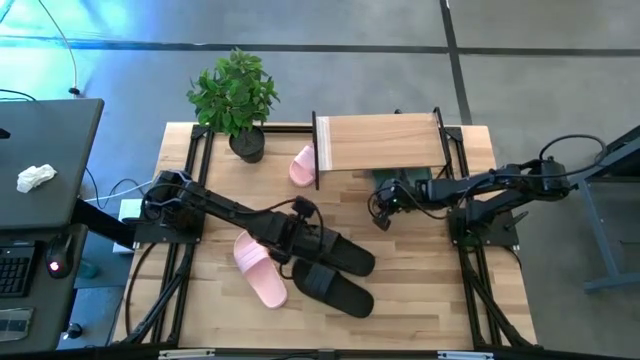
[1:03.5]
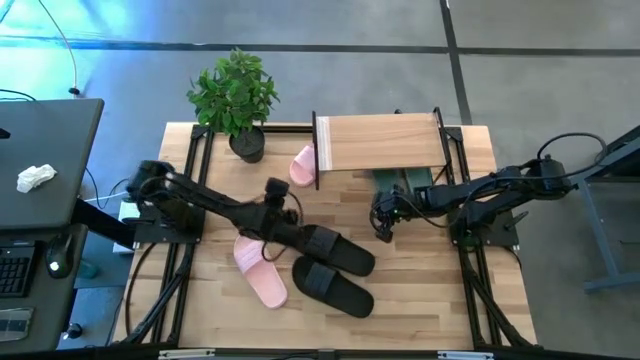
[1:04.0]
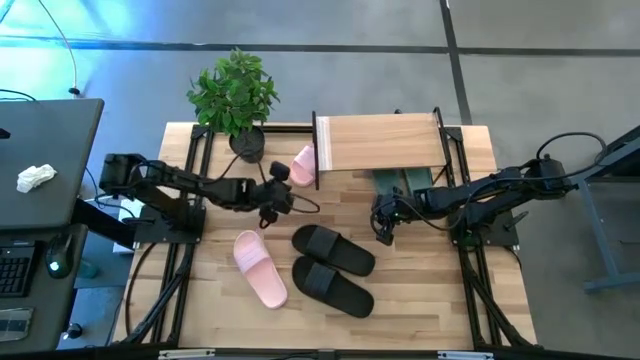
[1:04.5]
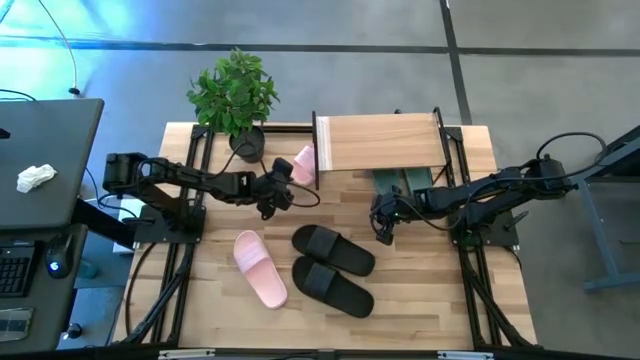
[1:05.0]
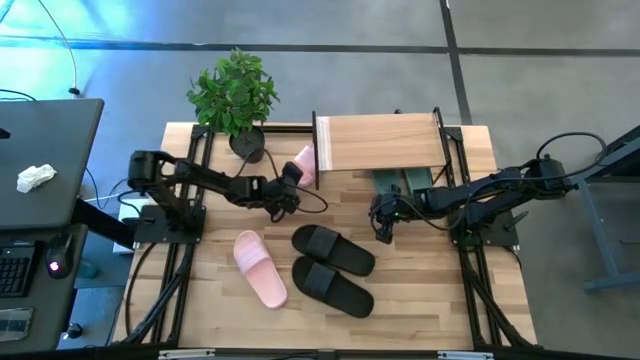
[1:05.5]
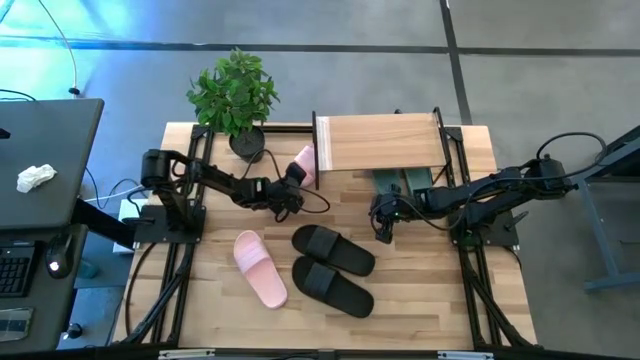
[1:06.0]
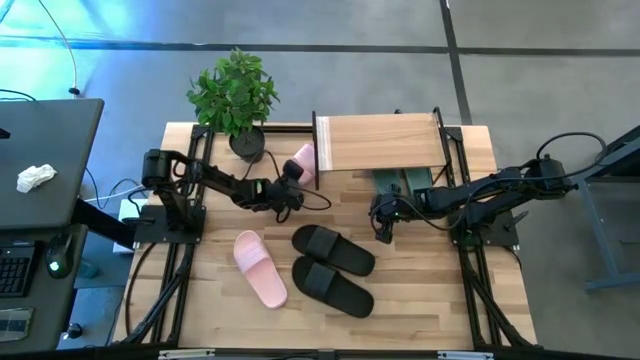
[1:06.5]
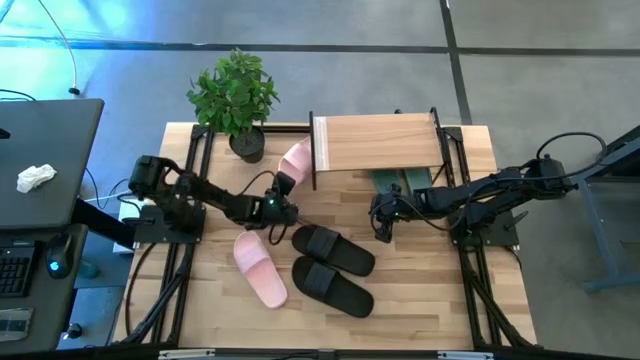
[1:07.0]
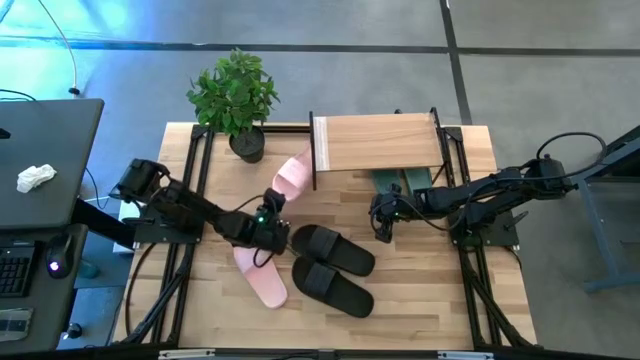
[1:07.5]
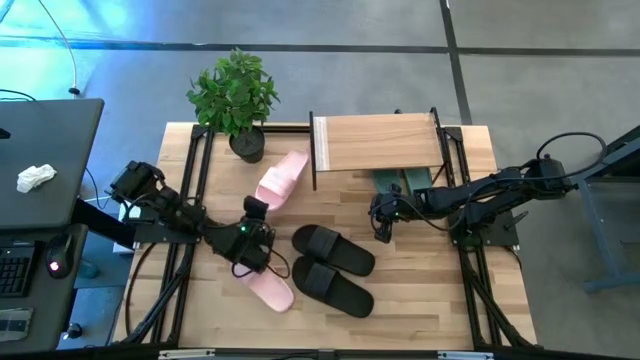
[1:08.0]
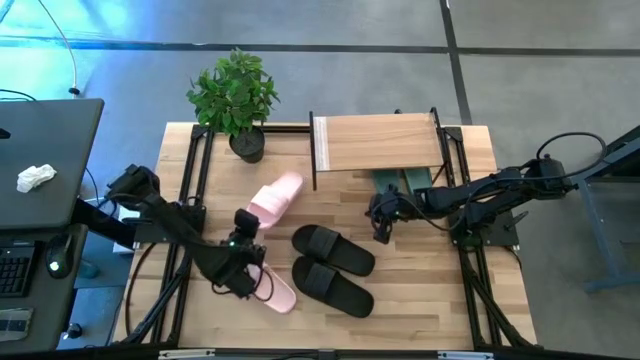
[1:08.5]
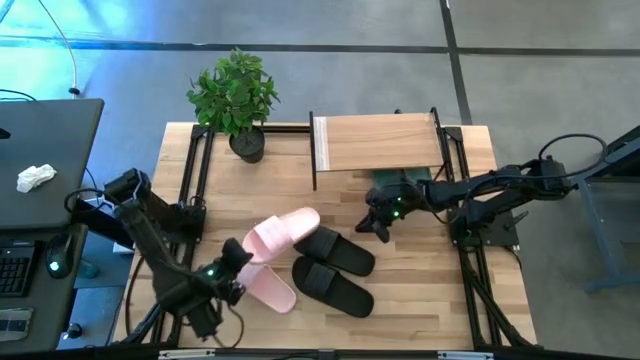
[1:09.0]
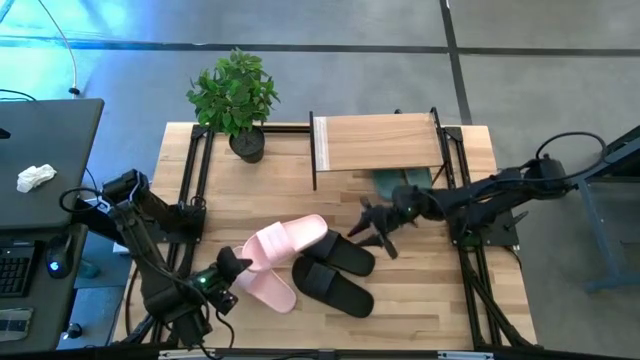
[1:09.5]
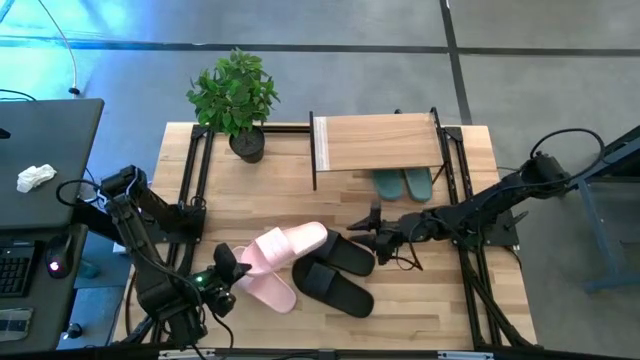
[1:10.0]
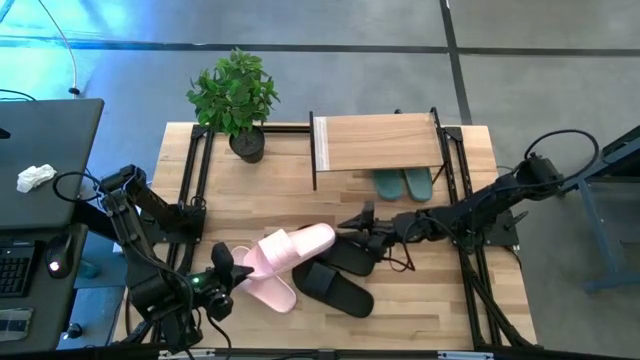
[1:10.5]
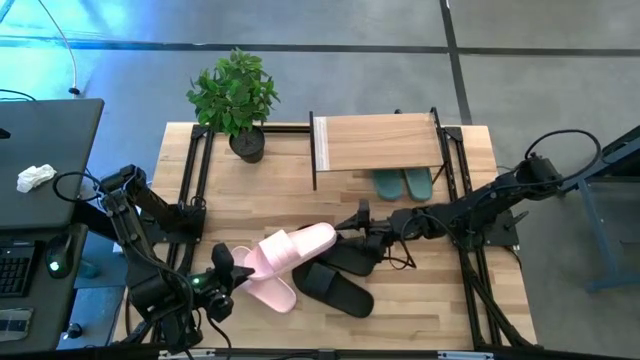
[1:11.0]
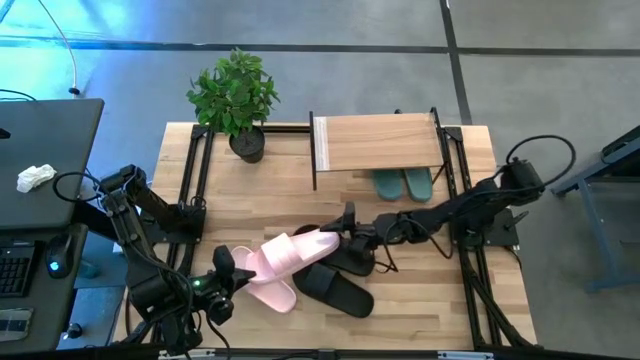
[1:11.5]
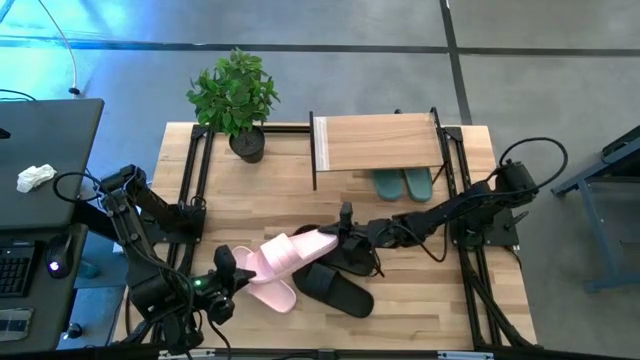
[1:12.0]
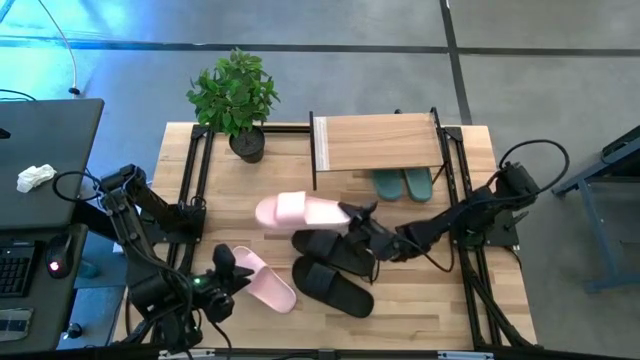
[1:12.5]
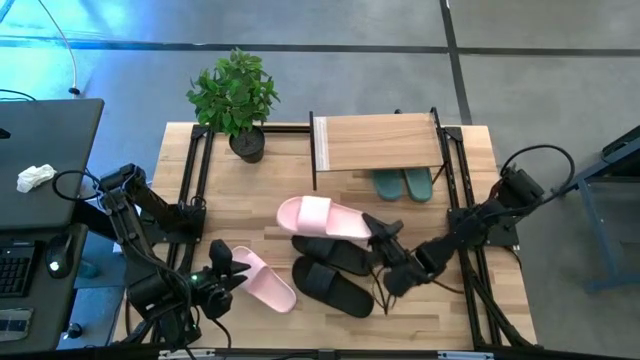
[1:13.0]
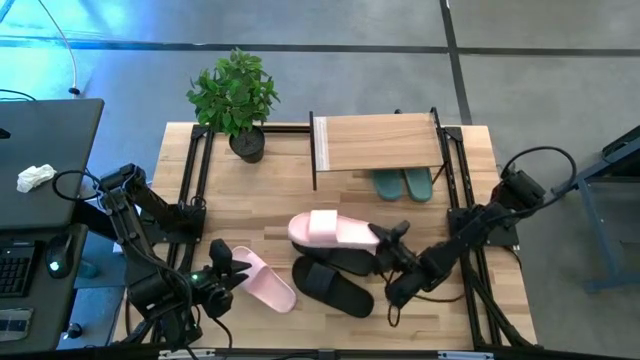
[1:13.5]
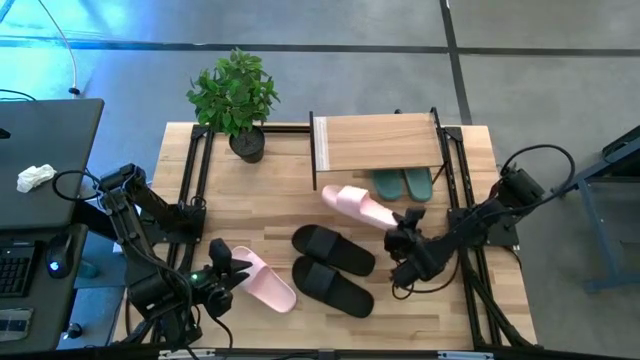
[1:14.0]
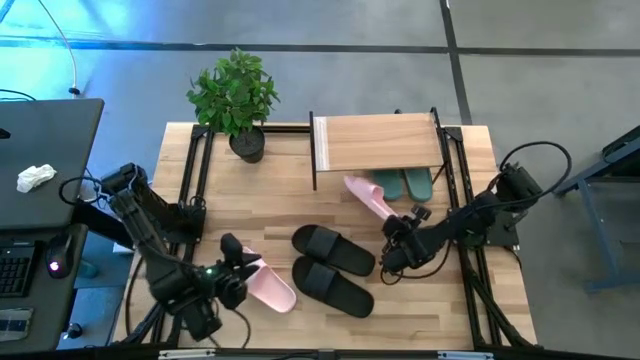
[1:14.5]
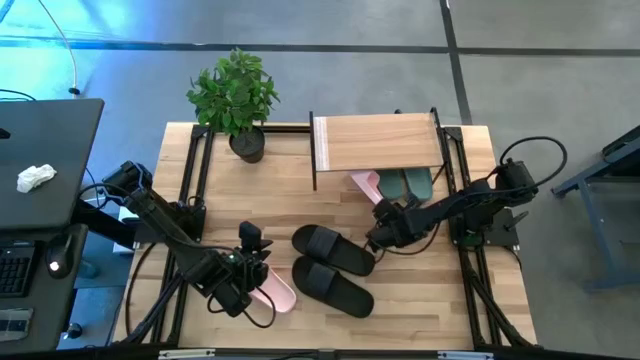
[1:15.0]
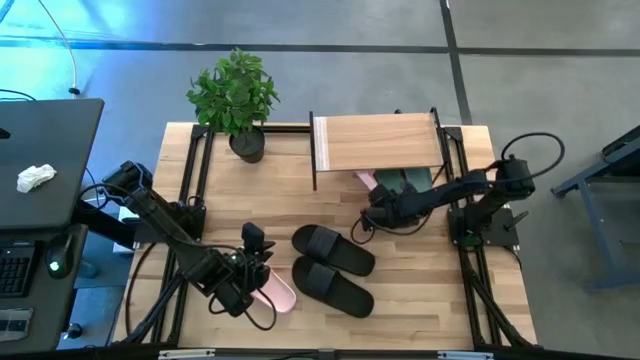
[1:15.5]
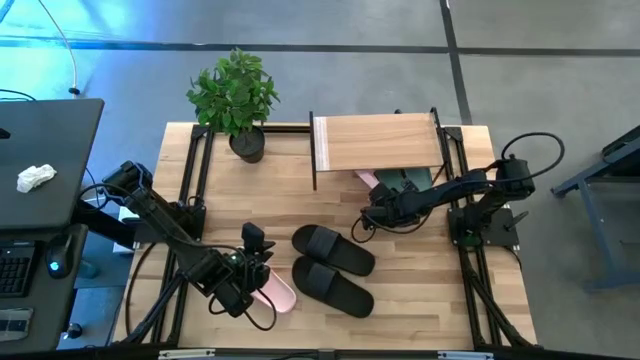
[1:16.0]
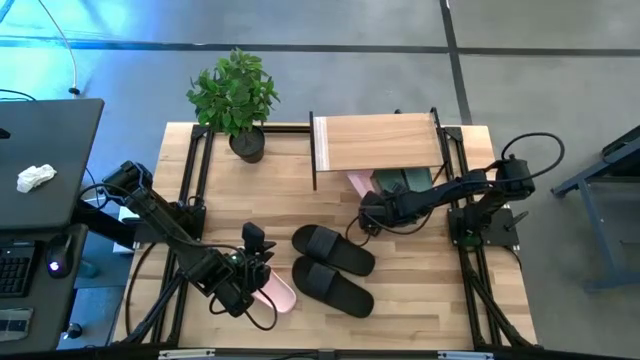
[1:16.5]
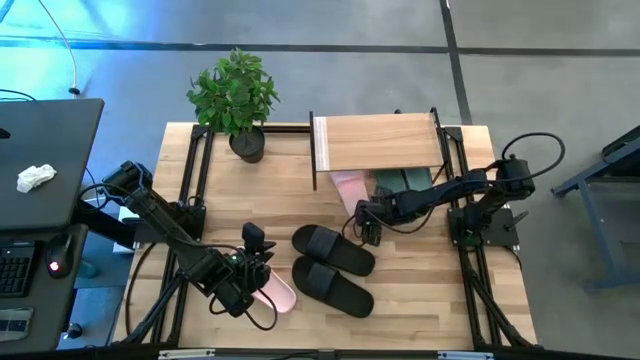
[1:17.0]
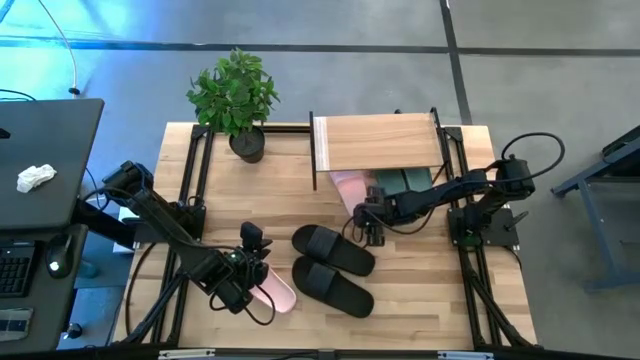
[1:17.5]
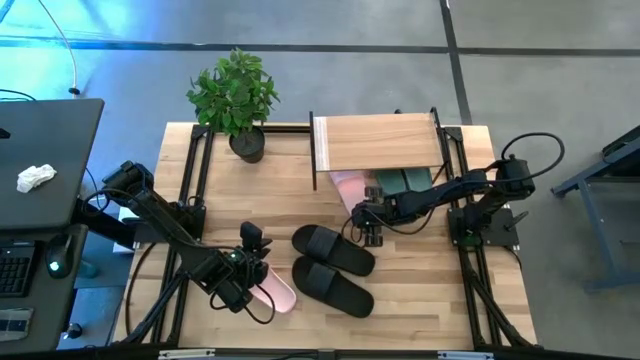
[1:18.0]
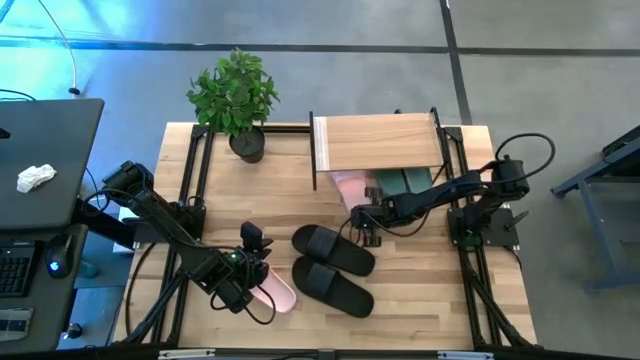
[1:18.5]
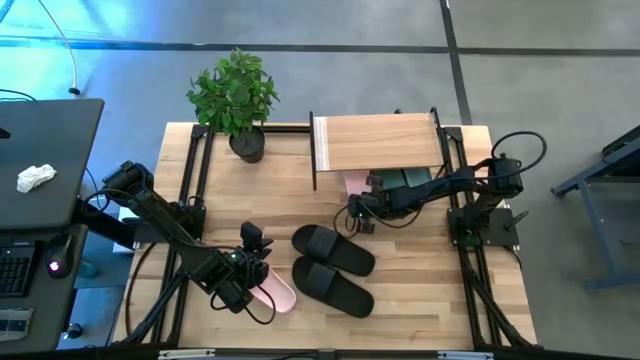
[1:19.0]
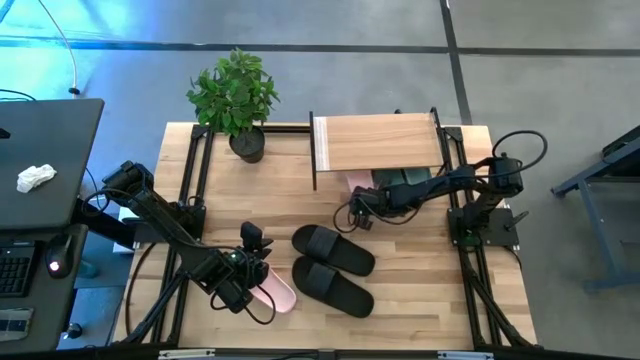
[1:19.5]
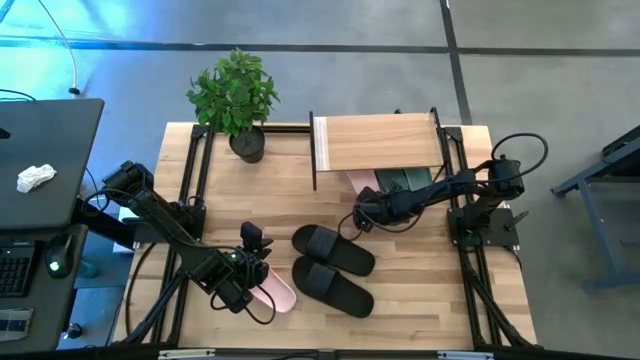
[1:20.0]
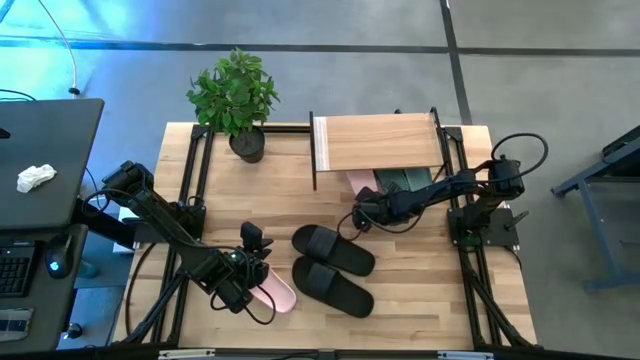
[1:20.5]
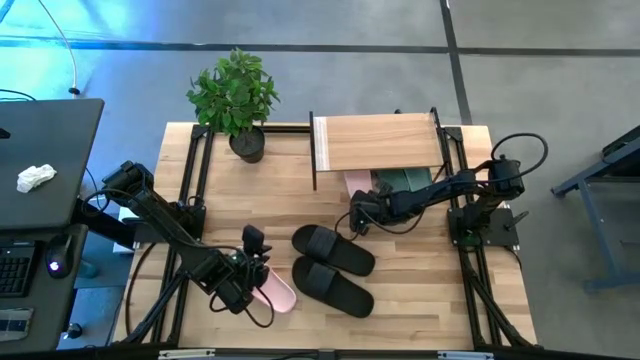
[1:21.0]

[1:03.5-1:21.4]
Task: Pick and place slides into the shelf
Put the top pink slide under the shelf

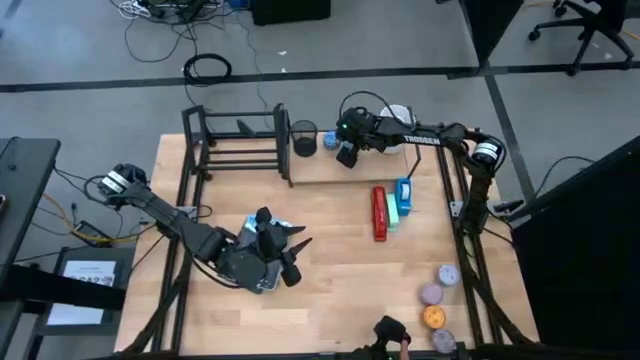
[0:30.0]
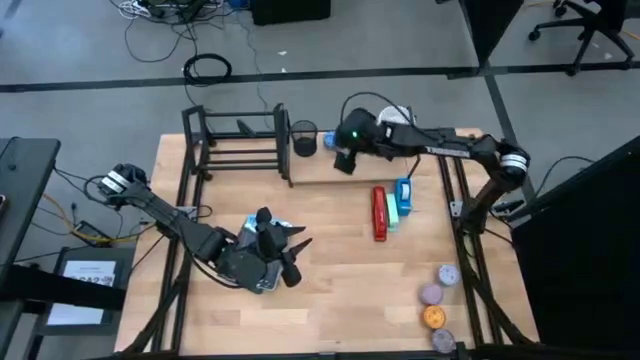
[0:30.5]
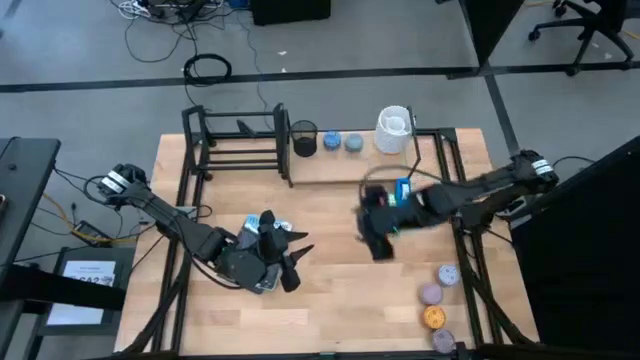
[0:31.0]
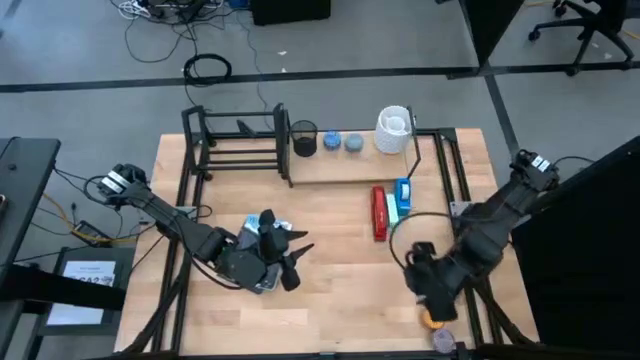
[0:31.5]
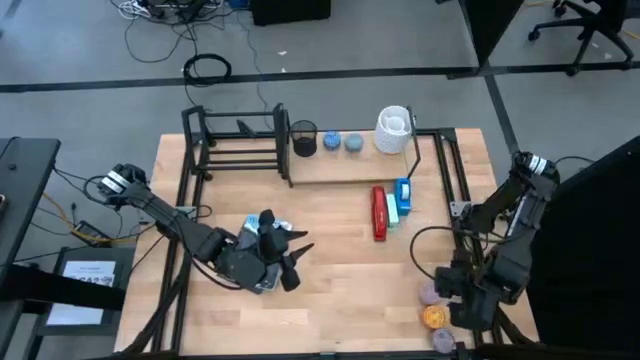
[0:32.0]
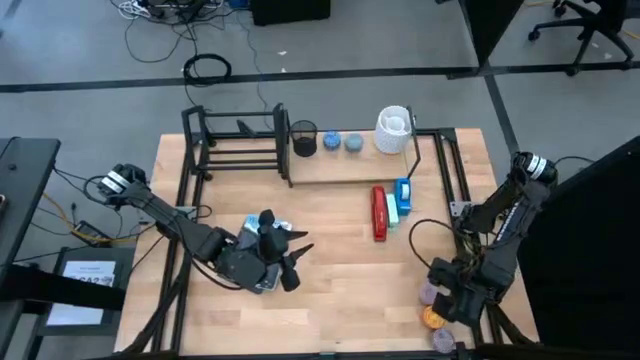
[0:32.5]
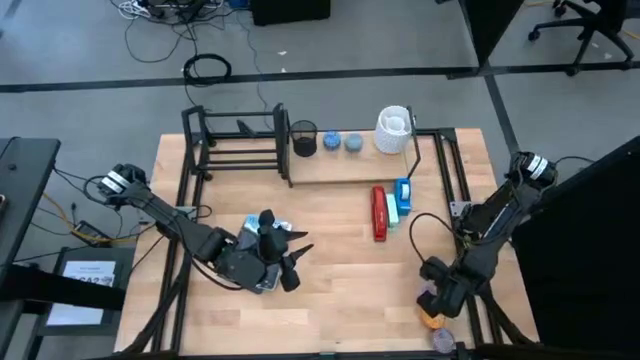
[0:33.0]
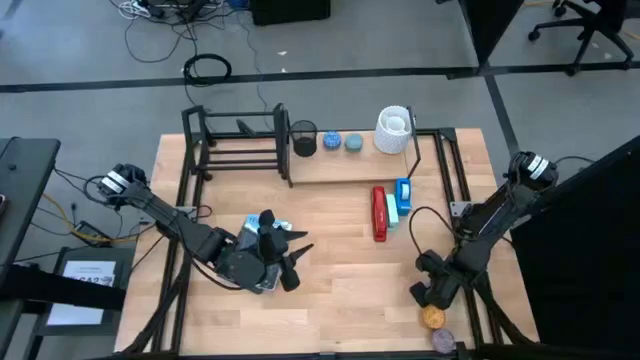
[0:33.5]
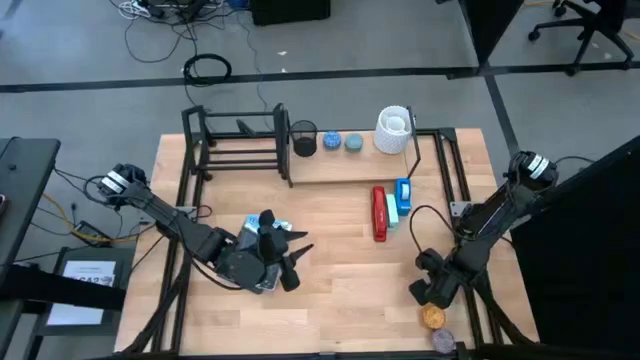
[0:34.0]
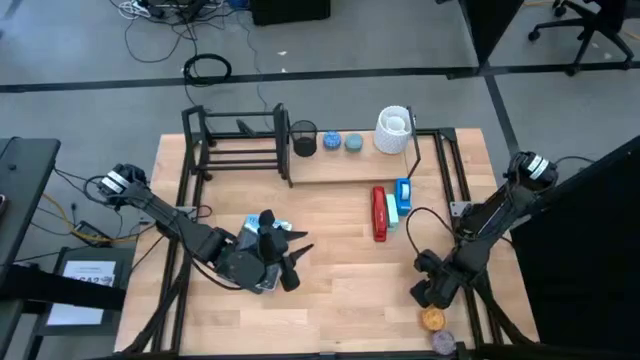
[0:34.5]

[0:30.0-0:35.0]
Task: Stock shelves
Put the light purple scented candle on the shelf
